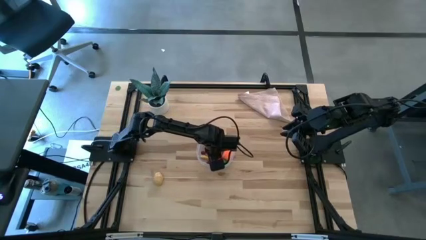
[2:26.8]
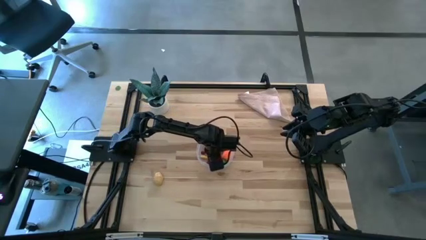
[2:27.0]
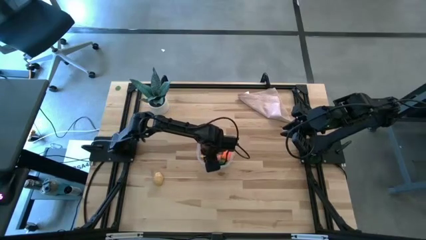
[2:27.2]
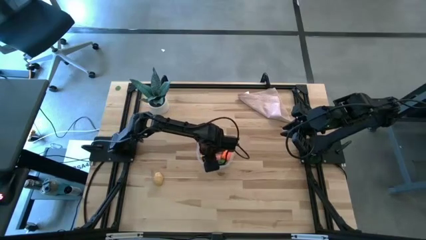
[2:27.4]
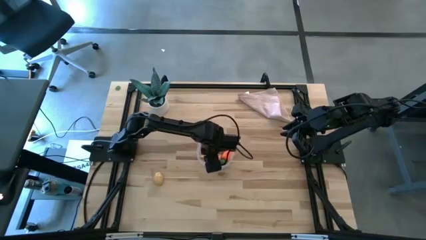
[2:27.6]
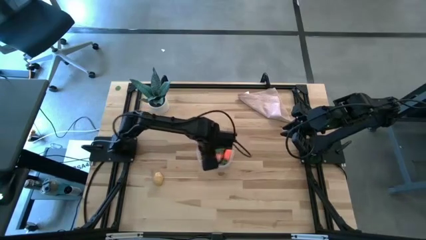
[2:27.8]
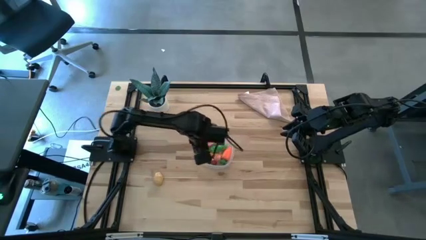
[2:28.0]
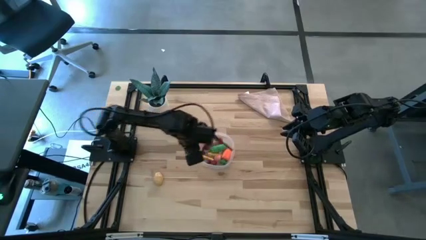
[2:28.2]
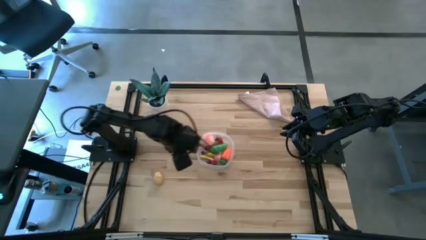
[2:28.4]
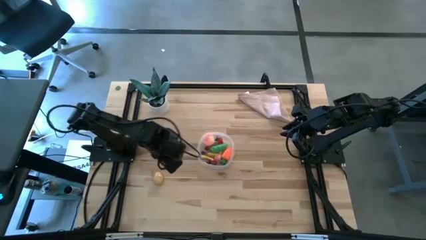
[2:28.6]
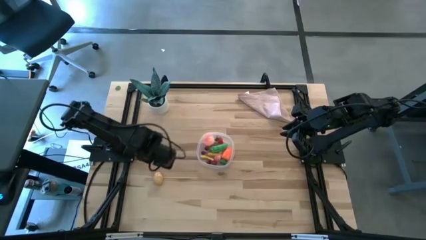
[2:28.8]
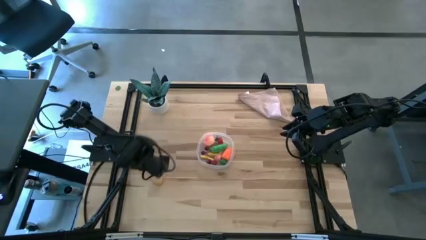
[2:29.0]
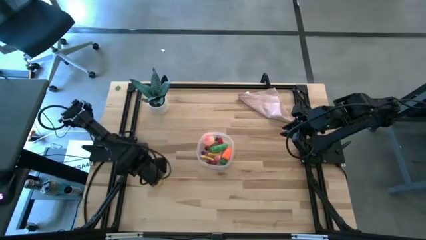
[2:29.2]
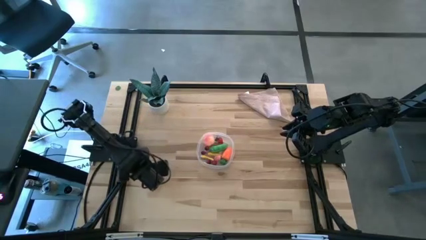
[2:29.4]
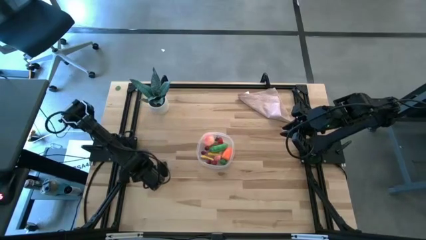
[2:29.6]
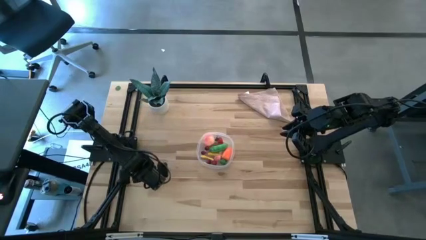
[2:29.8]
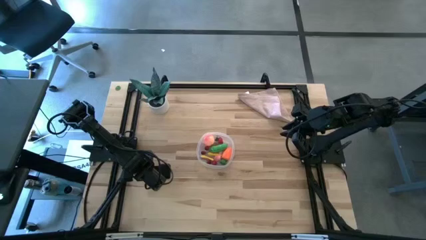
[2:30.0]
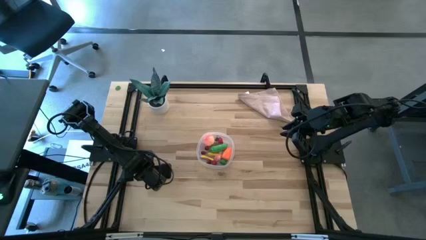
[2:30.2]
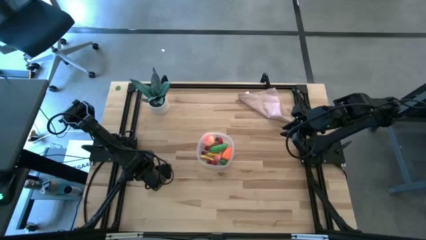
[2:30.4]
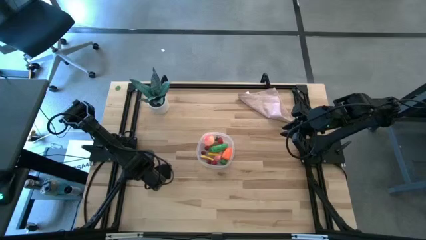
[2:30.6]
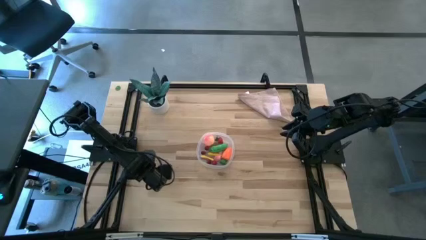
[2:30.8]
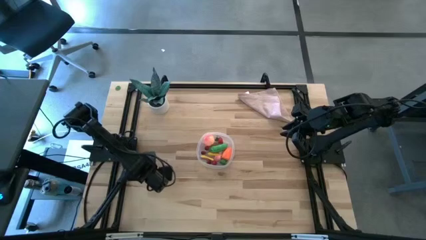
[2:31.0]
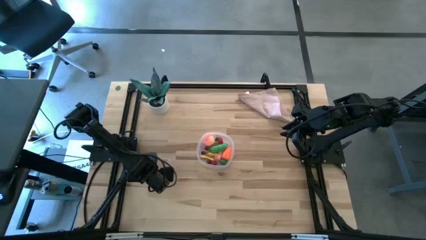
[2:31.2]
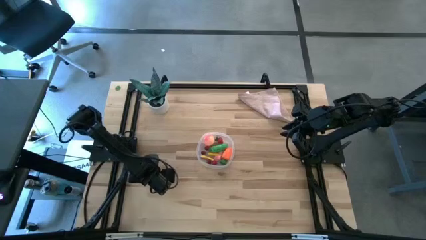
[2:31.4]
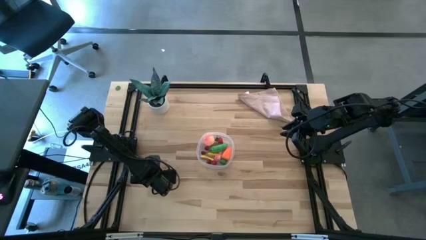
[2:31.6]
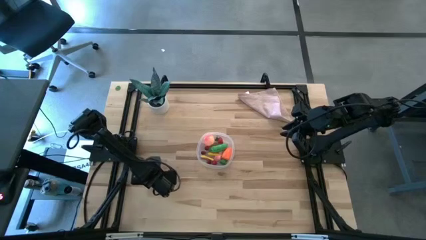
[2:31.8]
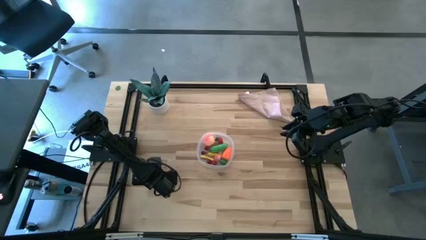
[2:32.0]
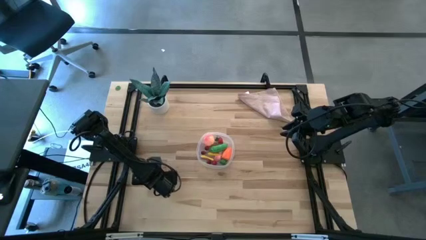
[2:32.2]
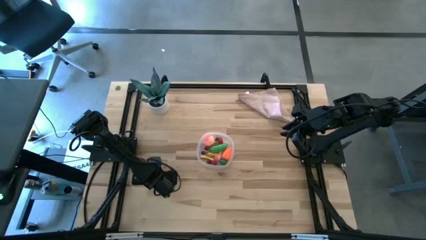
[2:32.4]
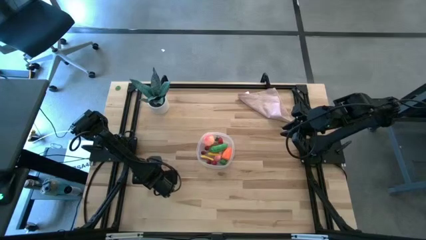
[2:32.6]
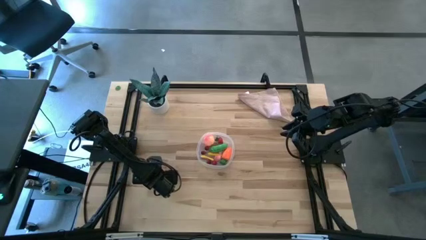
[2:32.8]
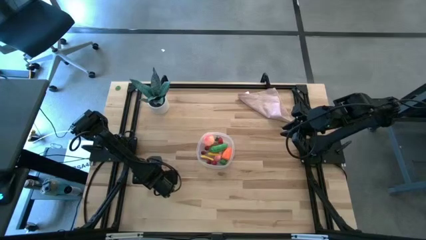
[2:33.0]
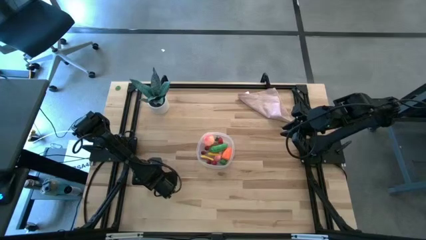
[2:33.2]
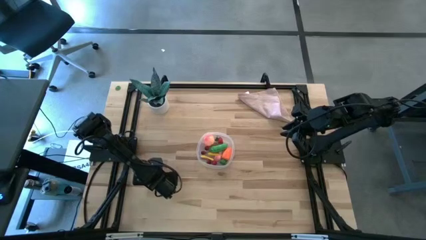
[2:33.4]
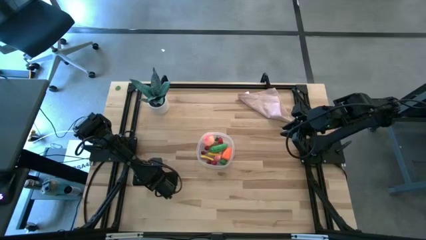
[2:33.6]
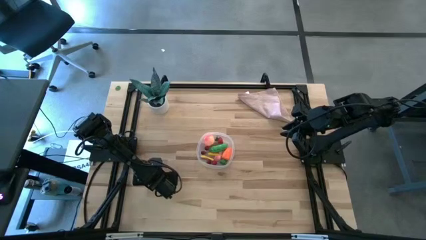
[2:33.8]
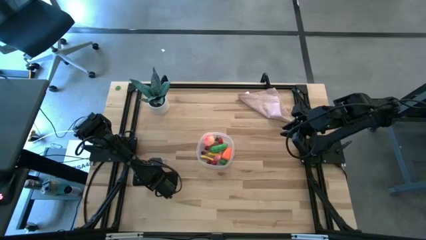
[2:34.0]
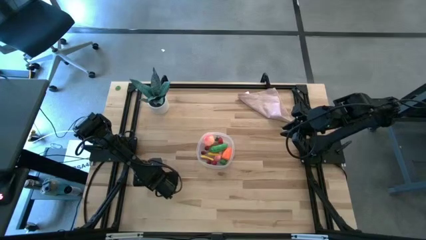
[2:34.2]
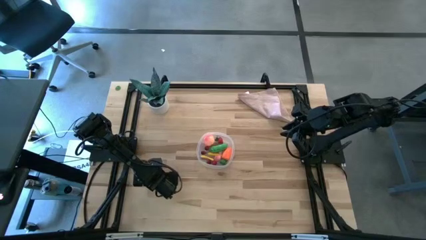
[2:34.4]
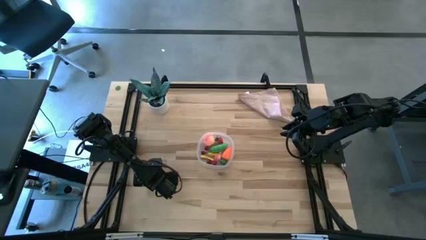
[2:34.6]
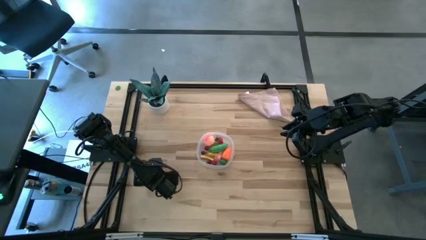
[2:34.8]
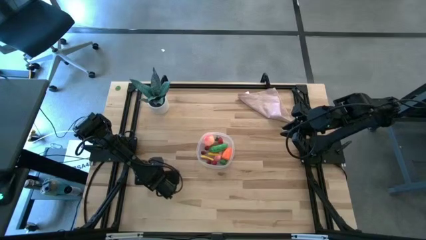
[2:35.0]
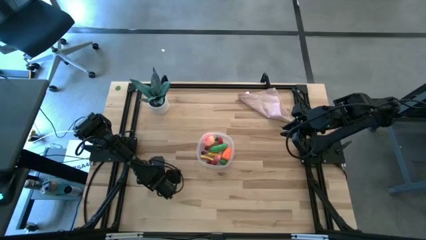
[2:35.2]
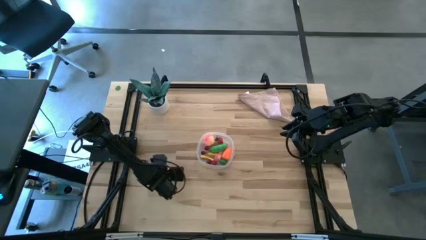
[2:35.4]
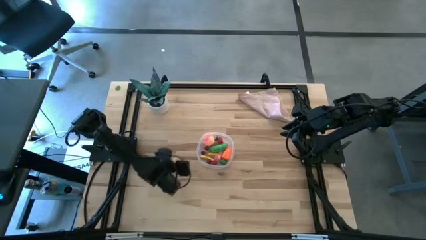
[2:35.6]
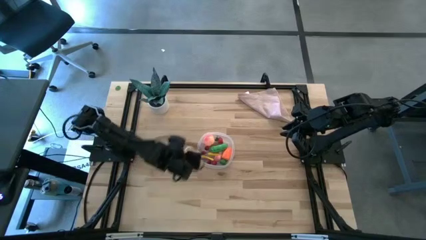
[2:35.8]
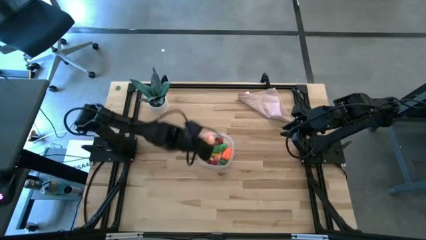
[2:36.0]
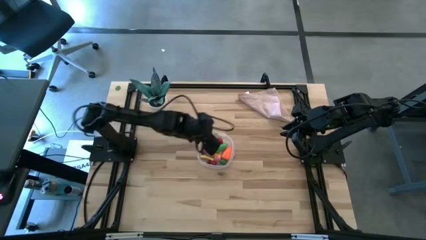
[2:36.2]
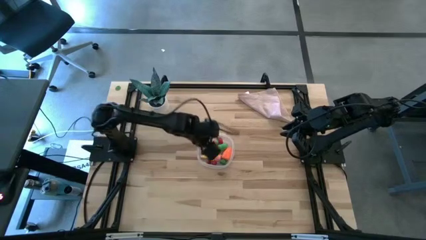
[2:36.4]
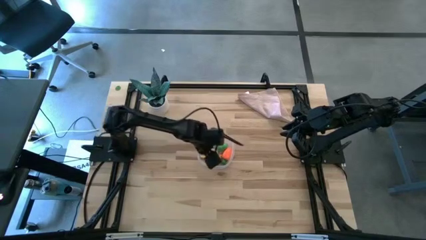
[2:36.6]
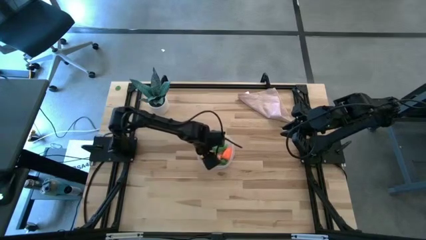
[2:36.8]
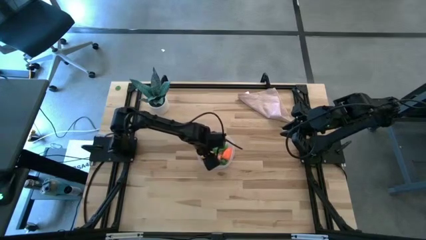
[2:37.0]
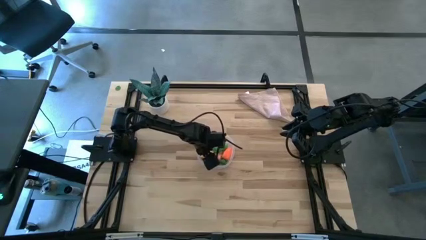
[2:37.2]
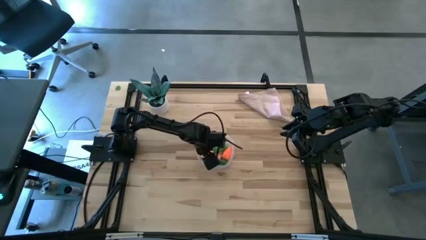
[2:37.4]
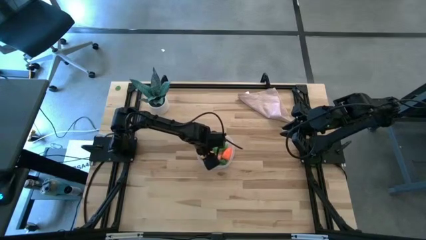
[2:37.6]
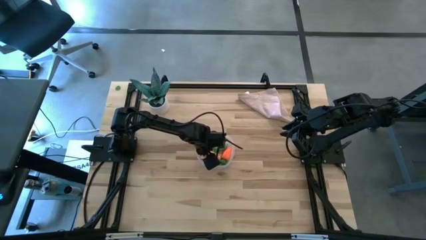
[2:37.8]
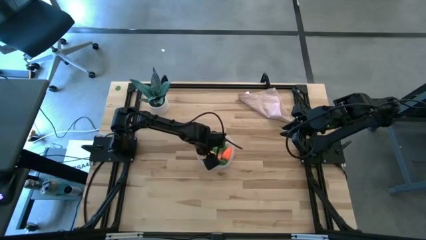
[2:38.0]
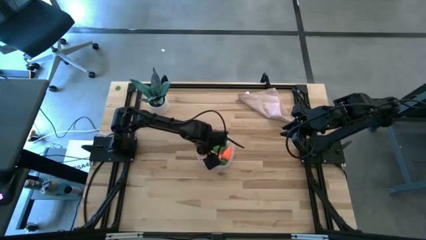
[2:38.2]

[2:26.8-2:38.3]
Task: Pick and placing Produce into tupperware
Put the brown potato into the transparent bin

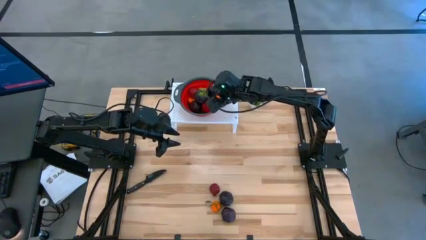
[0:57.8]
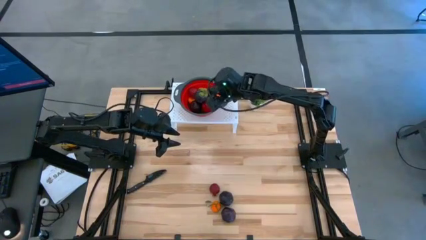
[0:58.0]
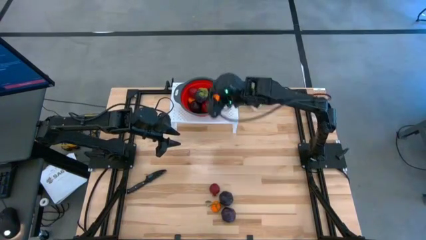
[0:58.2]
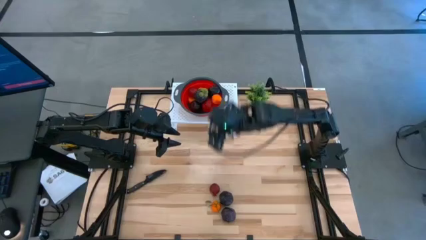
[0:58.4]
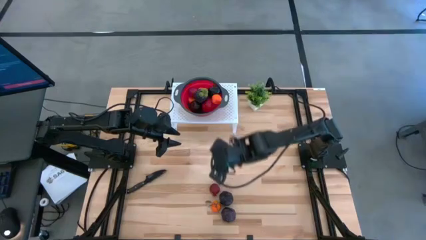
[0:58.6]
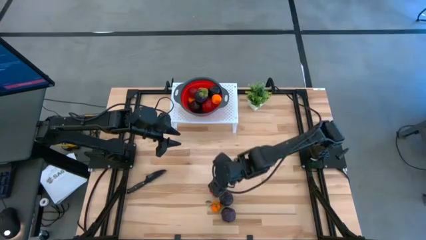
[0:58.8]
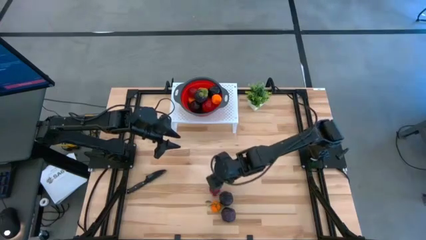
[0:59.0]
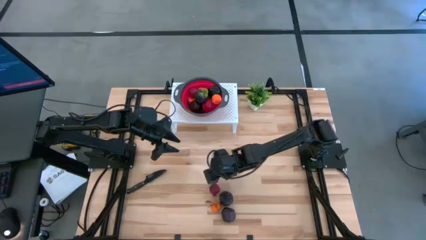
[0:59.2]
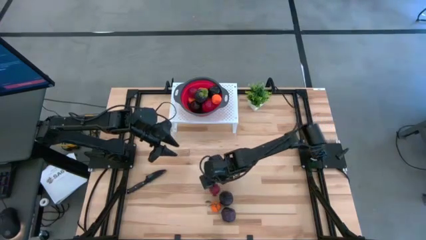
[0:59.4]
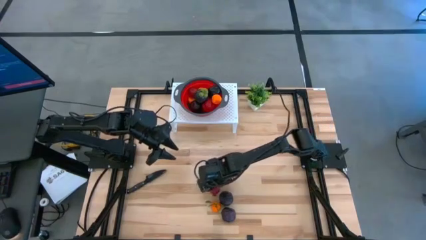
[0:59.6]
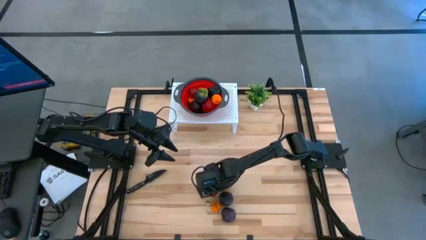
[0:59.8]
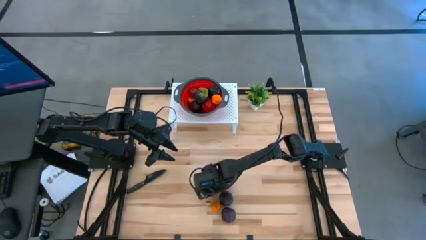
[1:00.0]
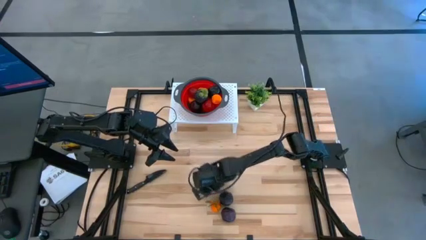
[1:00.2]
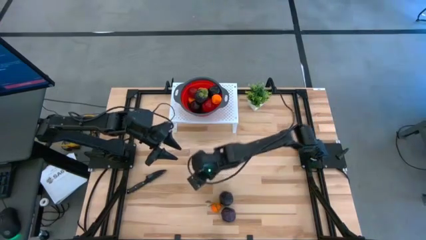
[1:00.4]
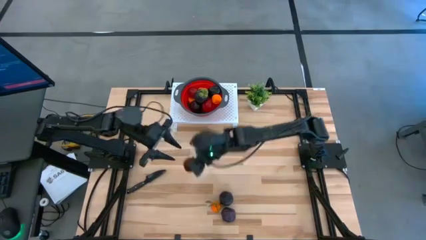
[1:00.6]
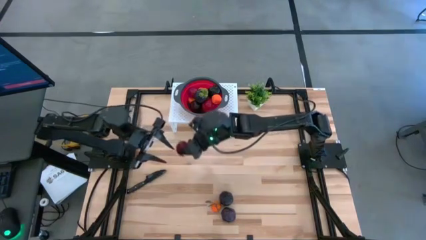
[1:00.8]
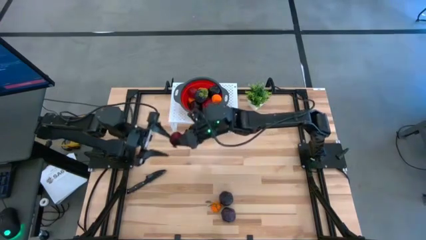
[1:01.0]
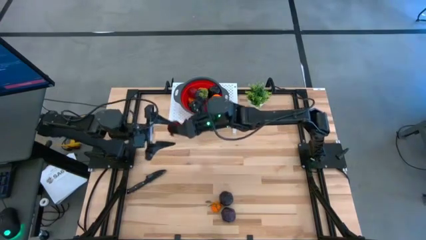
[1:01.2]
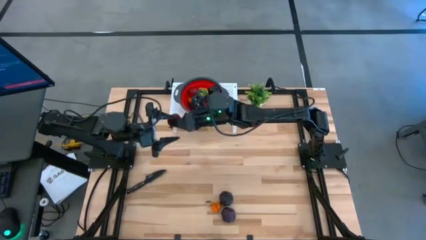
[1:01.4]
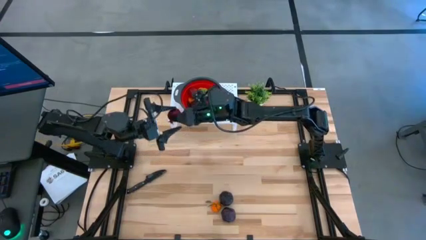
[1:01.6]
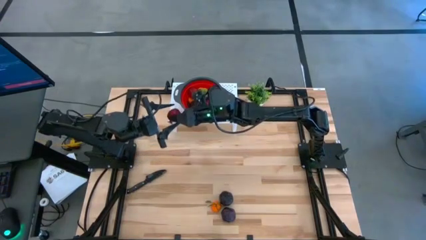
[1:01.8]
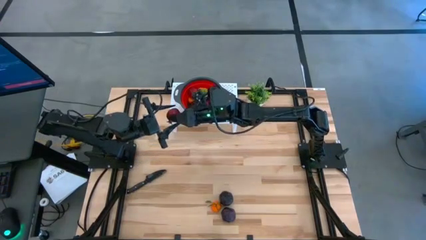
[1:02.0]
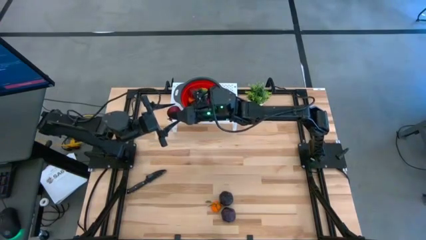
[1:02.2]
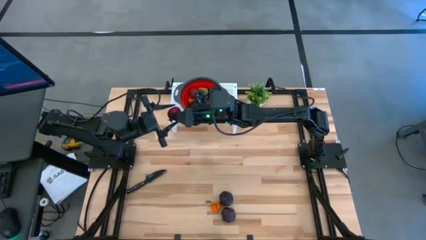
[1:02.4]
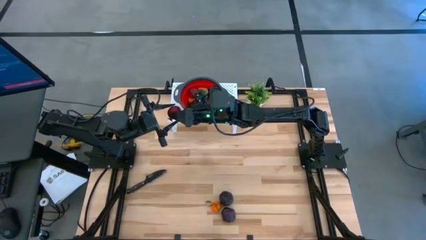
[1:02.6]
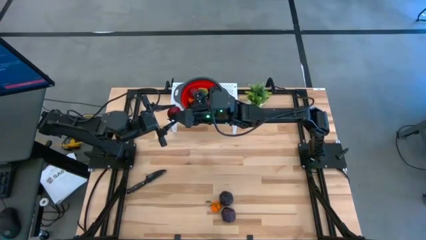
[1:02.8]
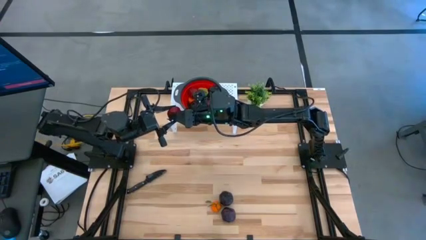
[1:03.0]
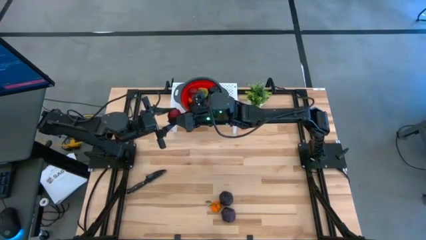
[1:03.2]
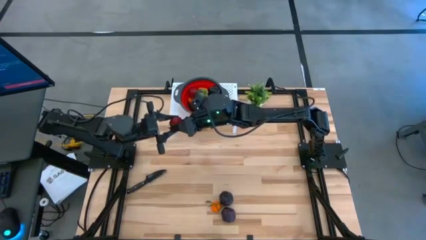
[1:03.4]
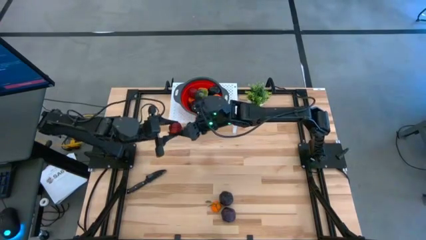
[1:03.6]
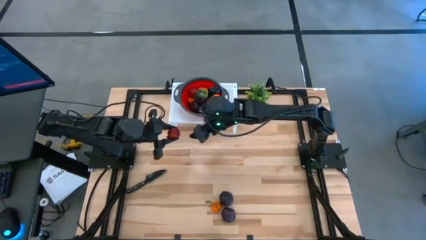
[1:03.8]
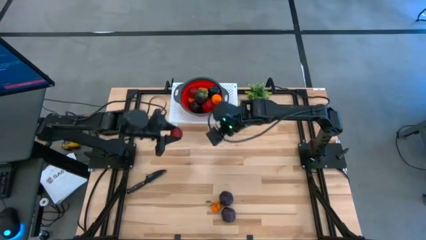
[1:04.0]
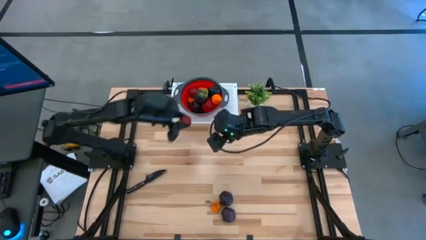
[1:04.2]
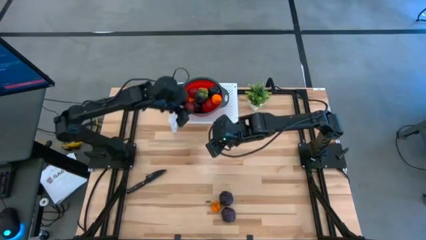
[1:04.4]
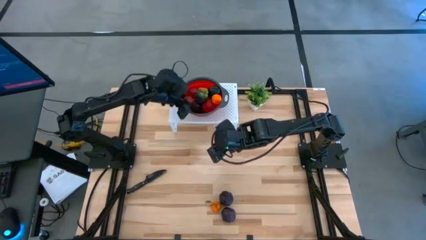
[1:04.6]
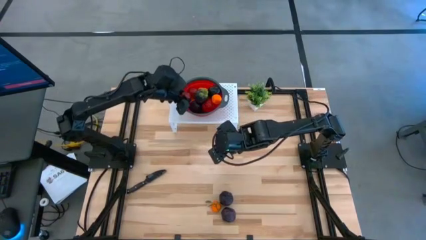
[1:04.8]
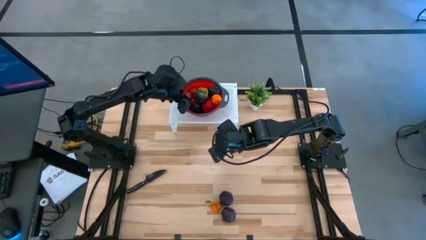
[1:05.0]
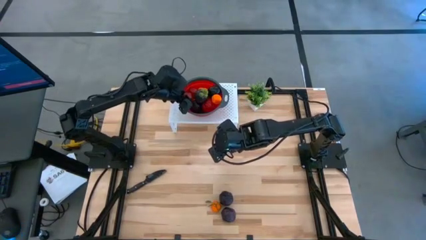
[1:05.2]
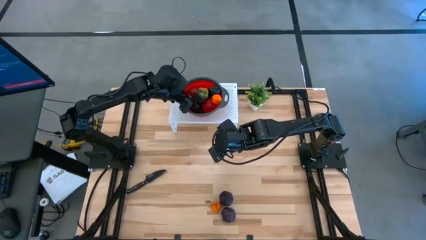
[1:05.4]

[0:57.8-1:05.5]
Task: Pick & Place Fruit
Put the red pomegranate into the red strainer bowl on the shelf
